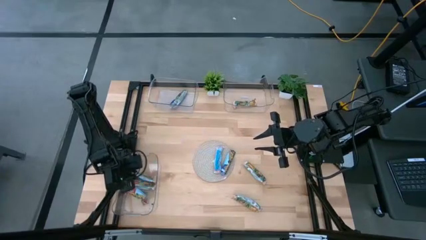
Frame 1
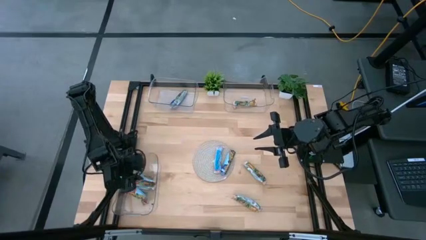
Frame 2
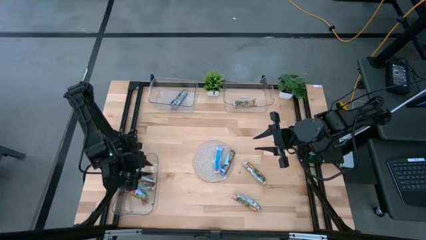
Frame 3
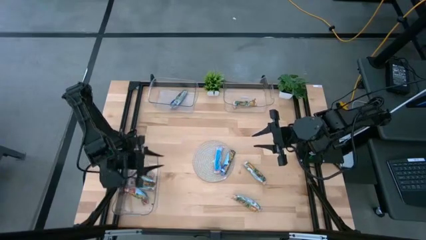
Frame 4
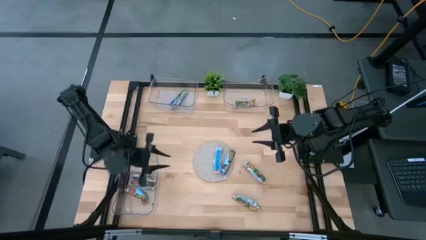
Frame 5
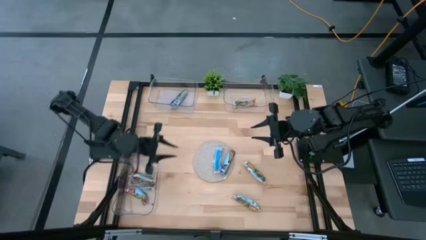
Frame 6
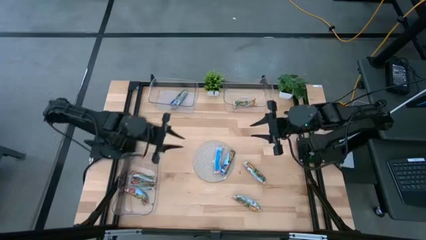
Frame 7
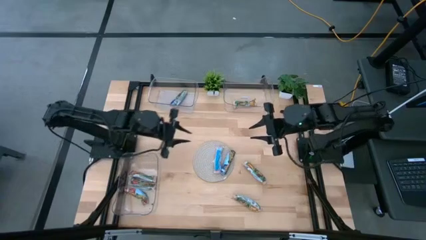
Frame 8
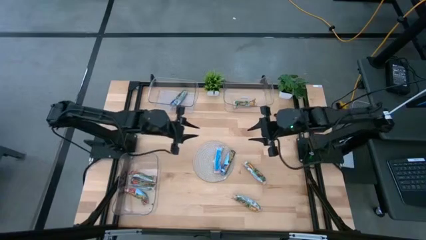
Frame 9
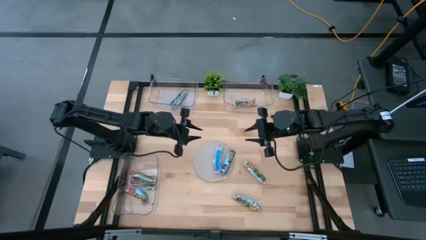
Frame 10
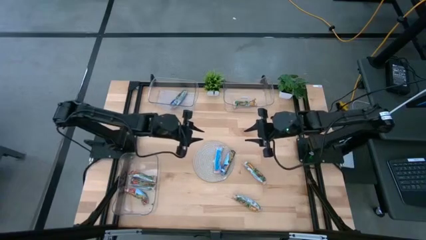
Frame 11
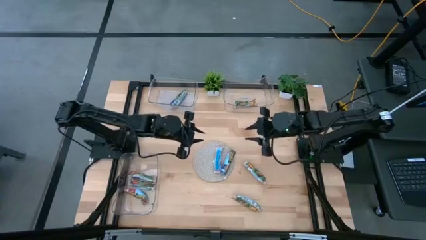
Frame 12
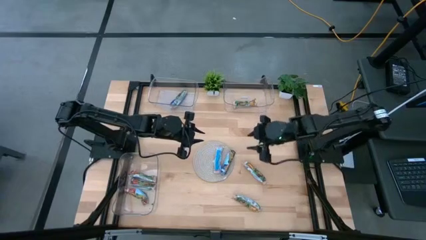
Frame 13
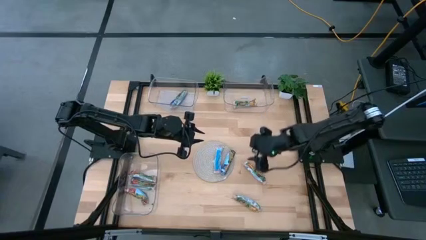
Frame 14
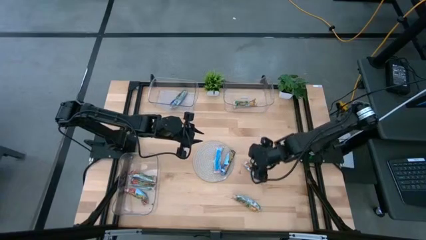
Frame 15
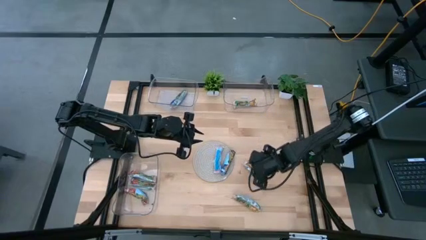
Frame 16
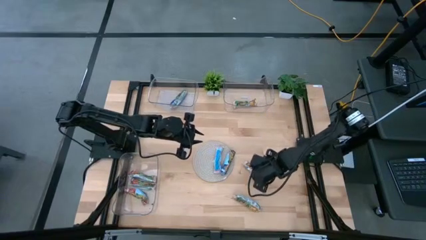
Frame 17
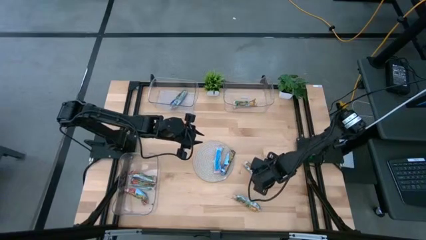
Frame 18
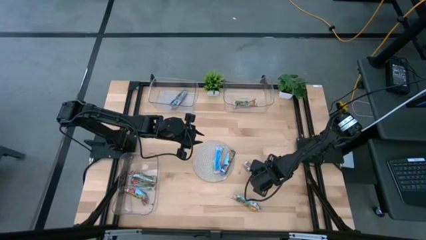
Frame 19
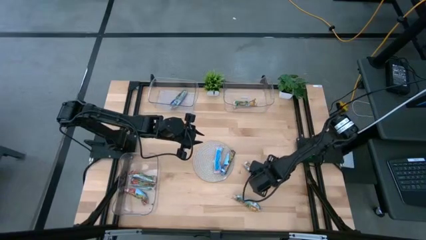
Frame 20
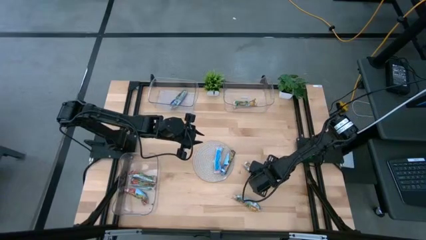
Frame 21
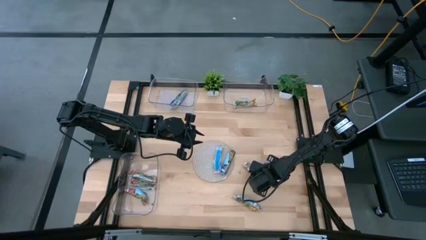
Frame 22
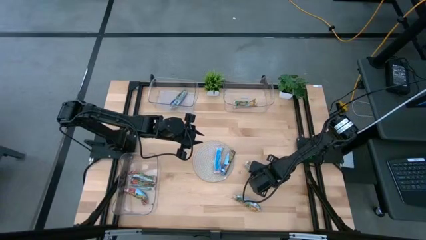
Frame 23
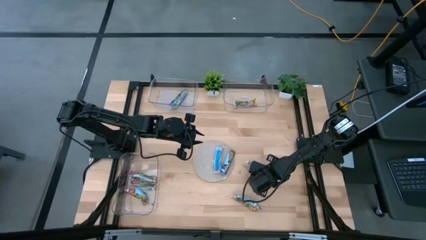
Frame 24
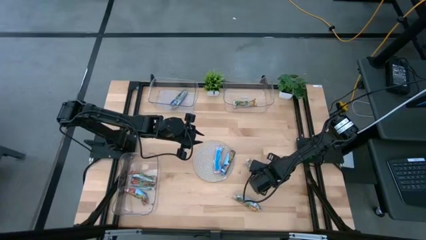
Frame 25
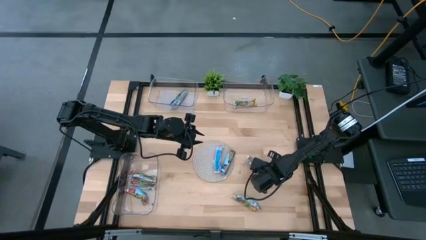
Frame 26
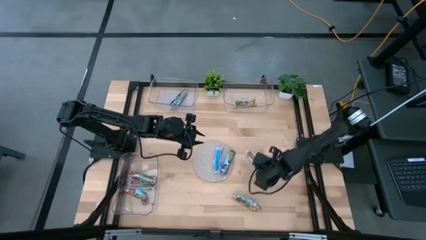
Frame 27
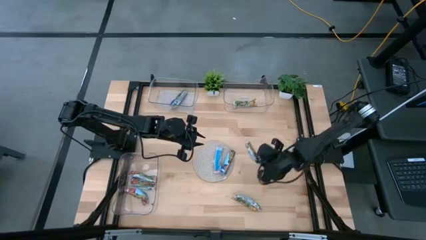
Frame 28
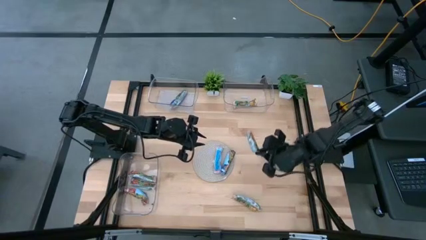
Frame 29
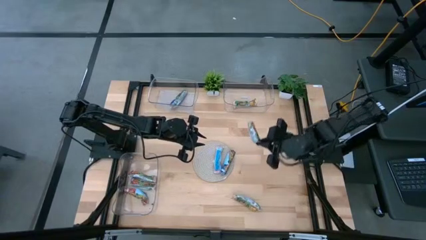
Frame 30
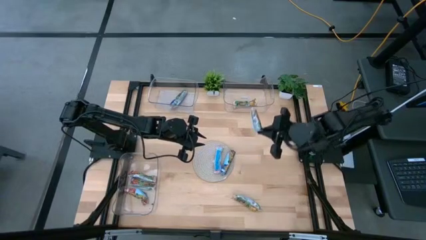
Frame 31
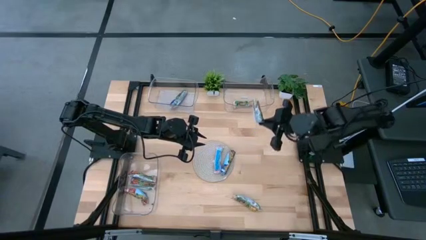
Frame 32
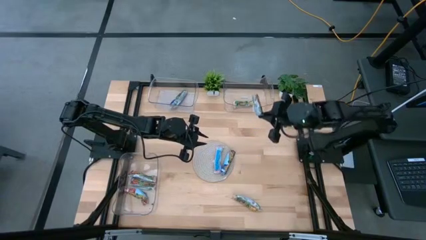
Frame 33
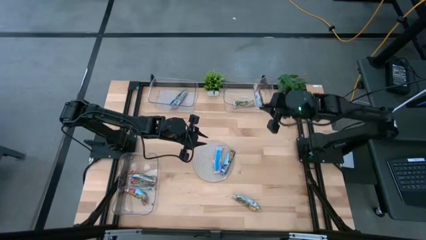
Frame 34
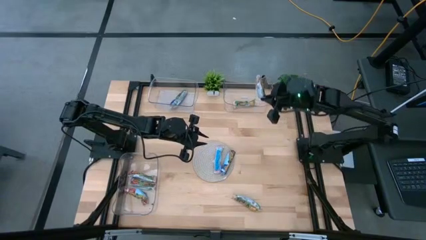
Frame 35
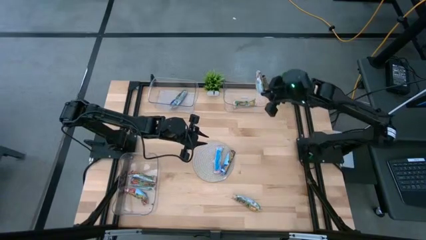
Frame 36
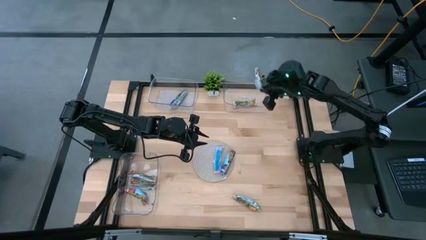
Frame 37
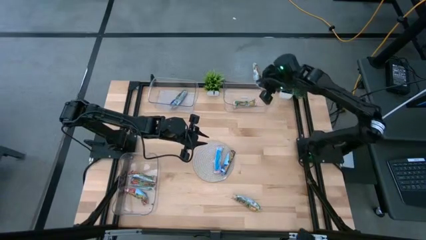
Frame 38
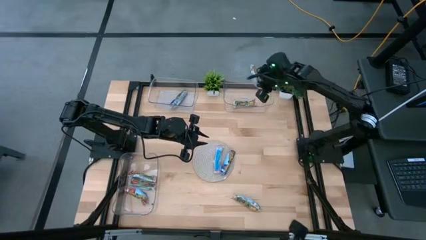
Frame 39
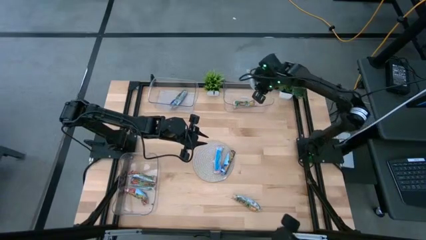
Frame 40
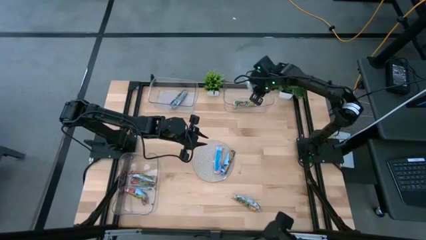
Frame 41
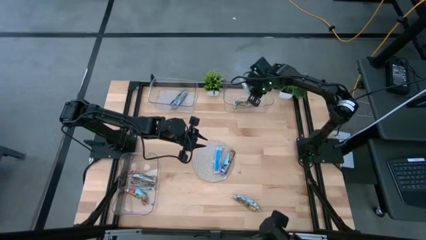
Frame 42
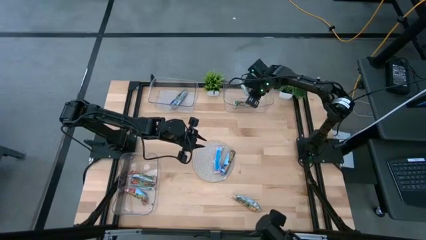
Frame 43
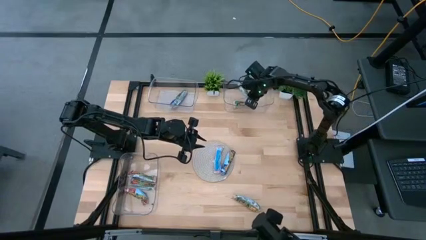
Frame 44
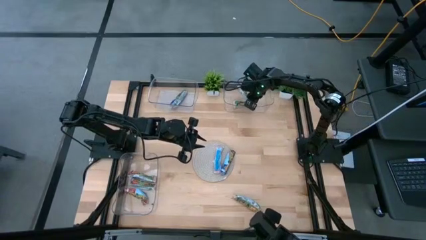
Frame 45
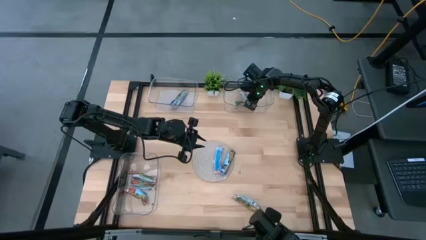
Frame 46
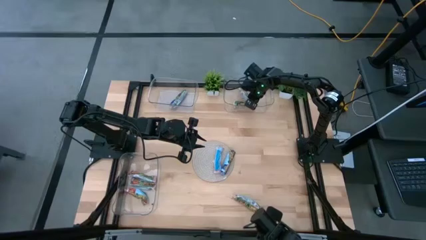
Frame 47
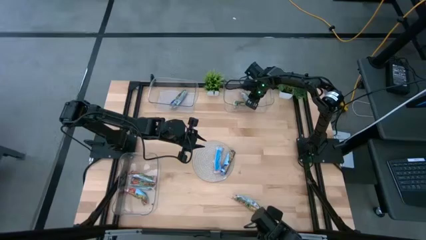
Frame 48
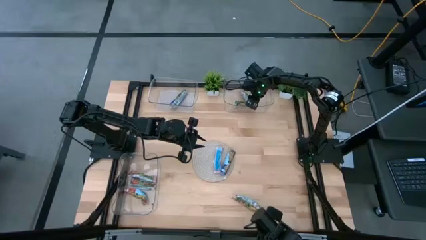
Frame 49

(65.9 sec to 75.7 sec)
Task: Pick and place Granola Bars by type
Put the yellow granola bar into the top right transparent bin
